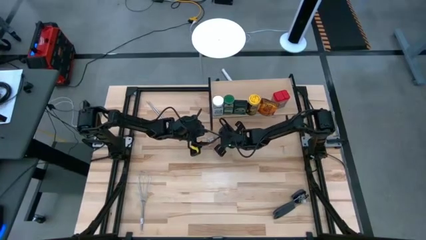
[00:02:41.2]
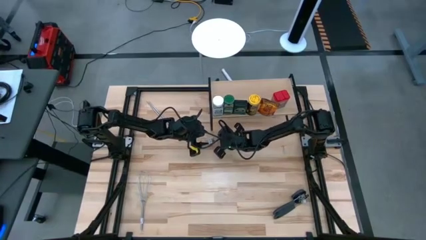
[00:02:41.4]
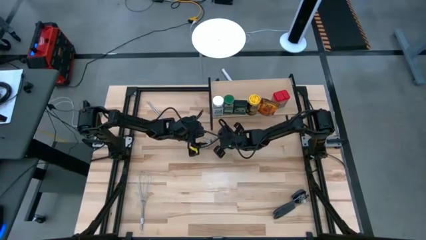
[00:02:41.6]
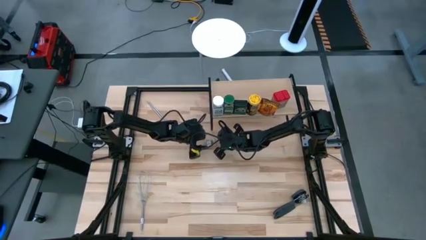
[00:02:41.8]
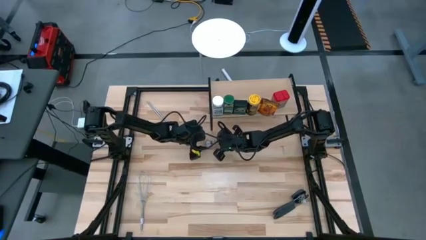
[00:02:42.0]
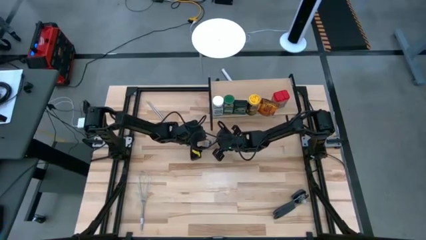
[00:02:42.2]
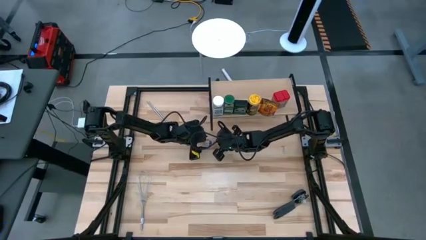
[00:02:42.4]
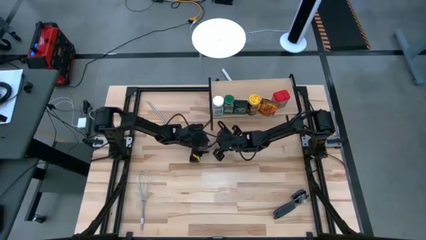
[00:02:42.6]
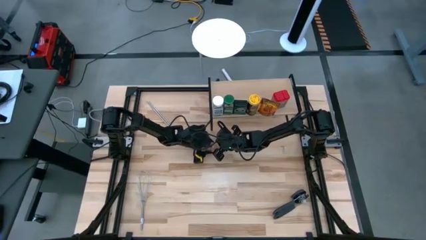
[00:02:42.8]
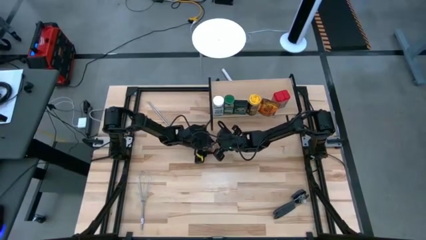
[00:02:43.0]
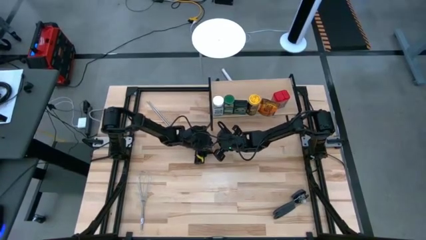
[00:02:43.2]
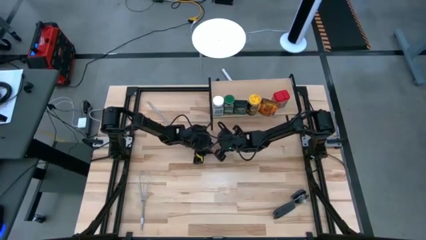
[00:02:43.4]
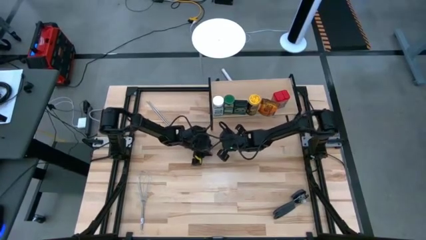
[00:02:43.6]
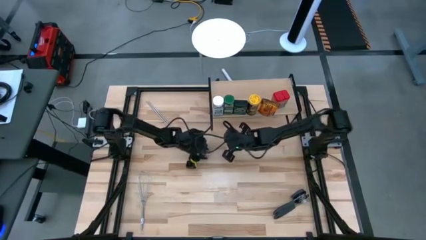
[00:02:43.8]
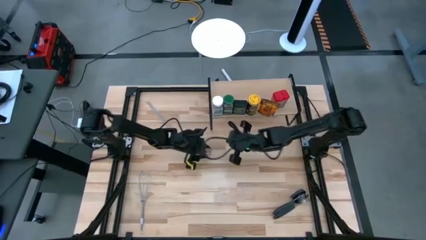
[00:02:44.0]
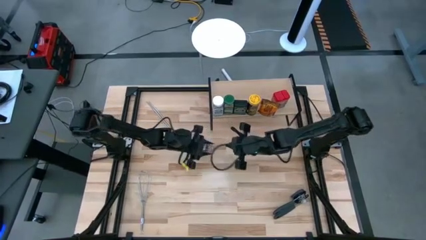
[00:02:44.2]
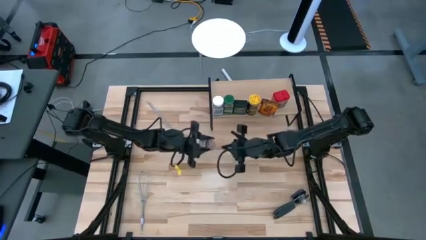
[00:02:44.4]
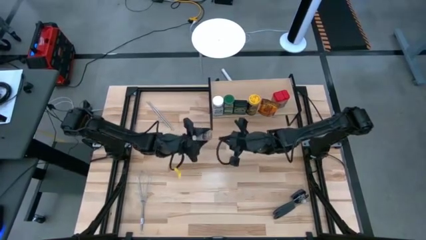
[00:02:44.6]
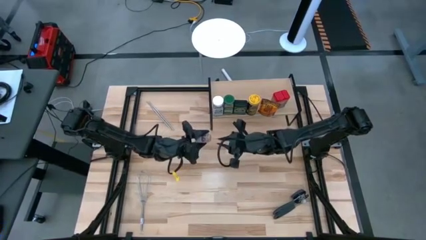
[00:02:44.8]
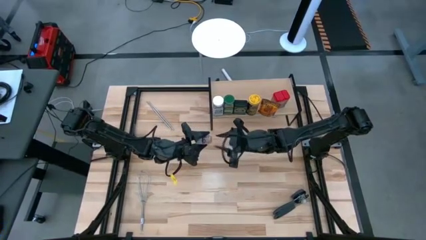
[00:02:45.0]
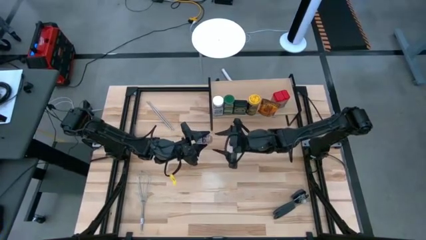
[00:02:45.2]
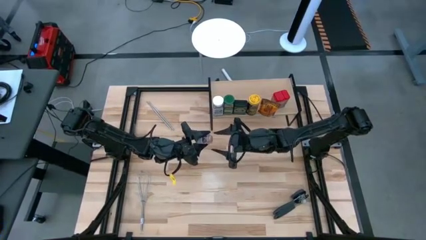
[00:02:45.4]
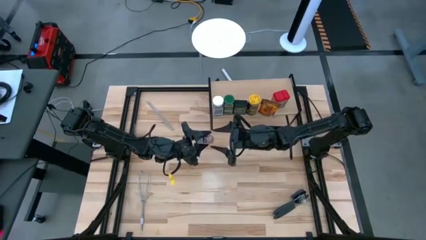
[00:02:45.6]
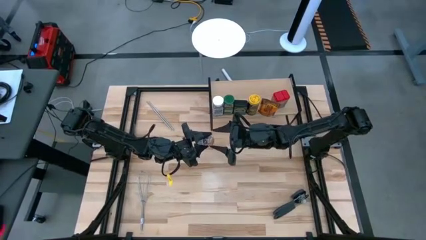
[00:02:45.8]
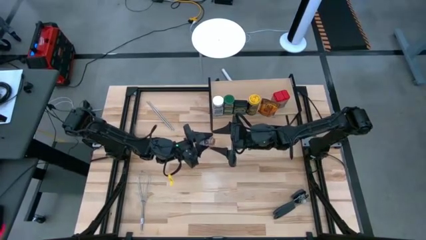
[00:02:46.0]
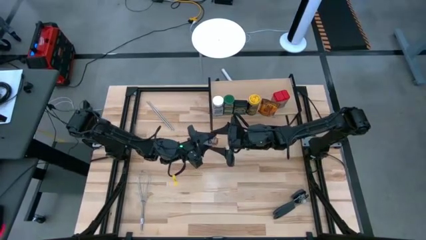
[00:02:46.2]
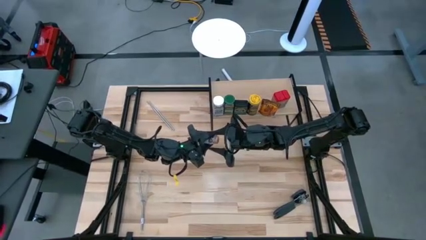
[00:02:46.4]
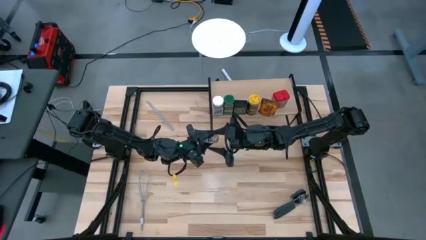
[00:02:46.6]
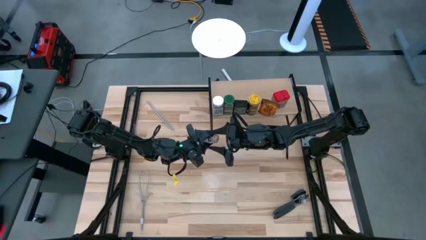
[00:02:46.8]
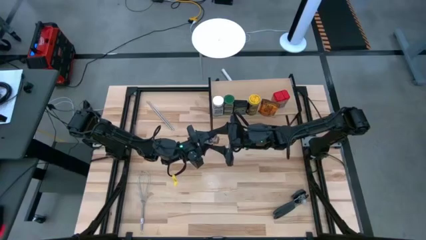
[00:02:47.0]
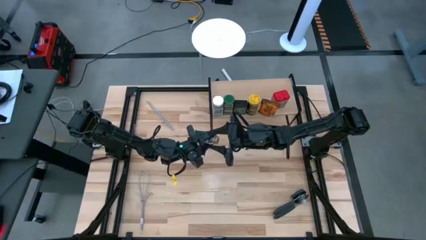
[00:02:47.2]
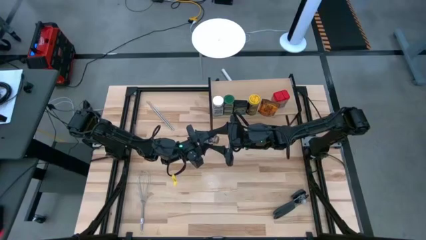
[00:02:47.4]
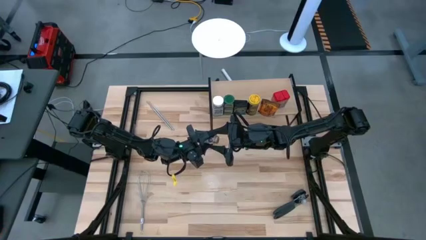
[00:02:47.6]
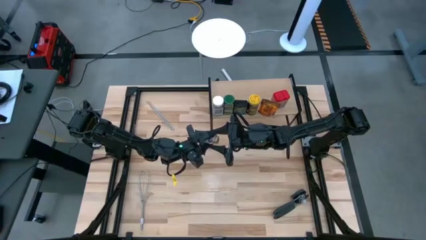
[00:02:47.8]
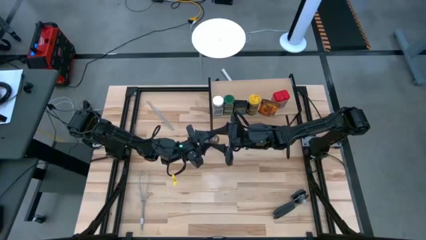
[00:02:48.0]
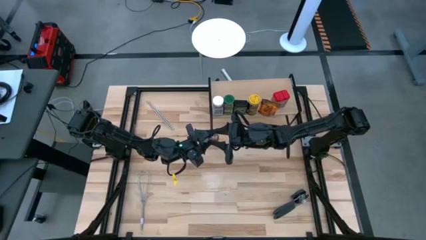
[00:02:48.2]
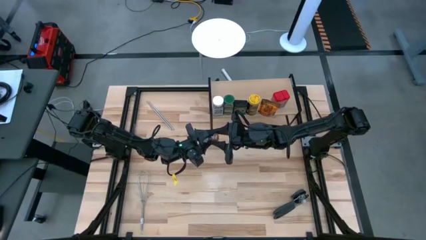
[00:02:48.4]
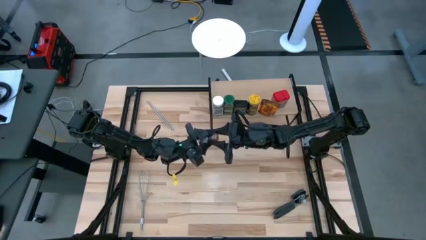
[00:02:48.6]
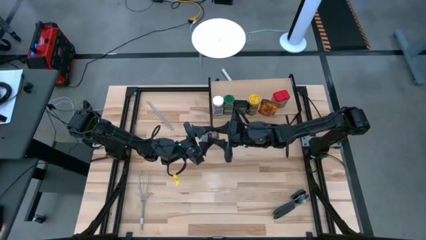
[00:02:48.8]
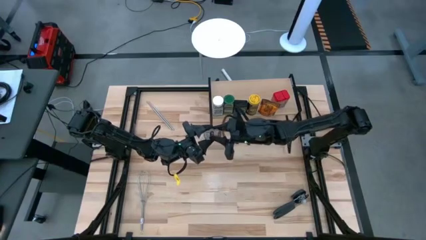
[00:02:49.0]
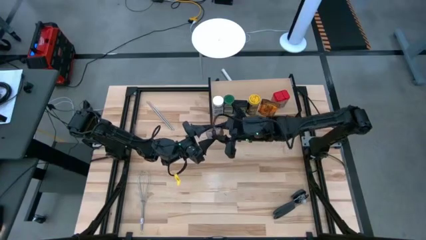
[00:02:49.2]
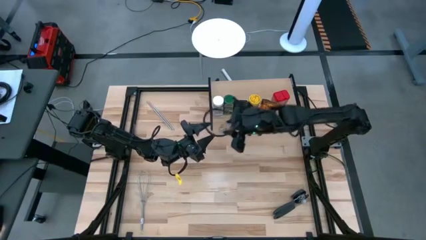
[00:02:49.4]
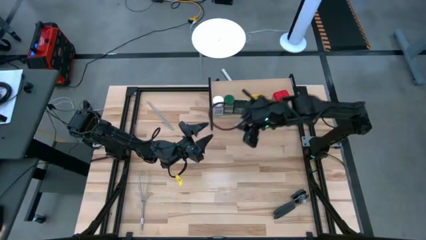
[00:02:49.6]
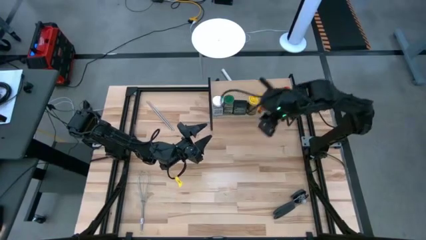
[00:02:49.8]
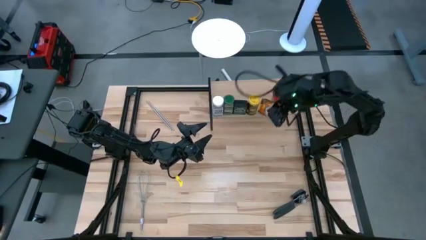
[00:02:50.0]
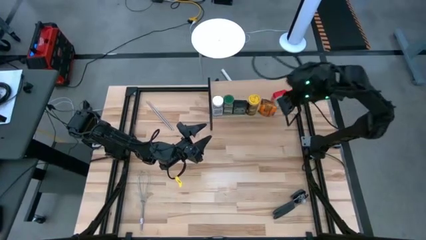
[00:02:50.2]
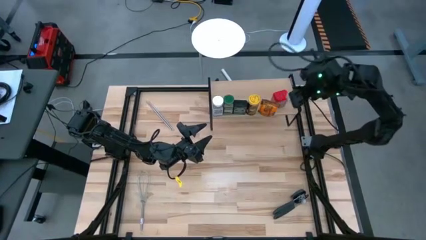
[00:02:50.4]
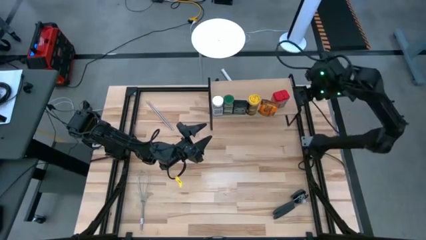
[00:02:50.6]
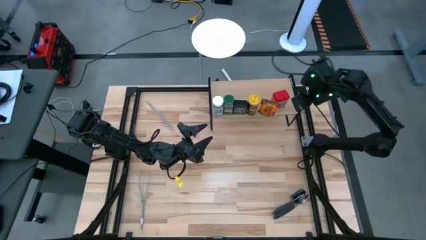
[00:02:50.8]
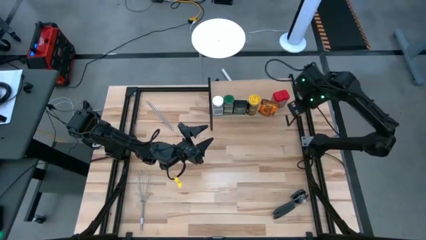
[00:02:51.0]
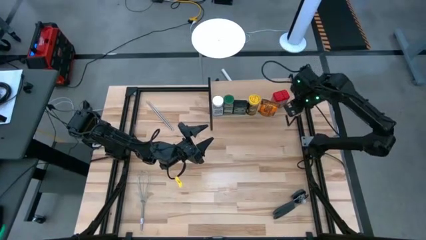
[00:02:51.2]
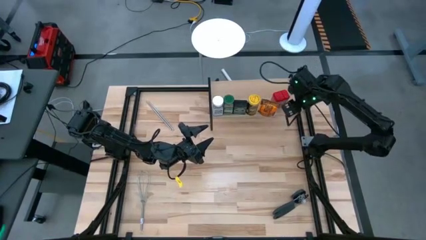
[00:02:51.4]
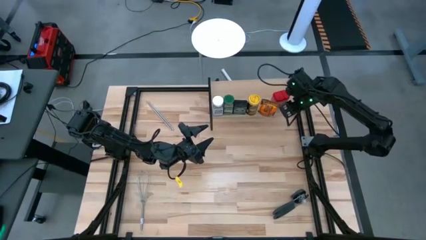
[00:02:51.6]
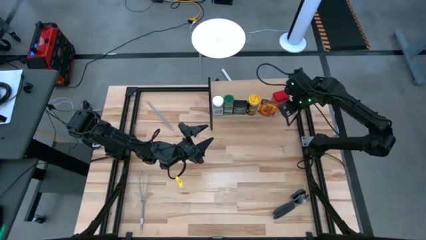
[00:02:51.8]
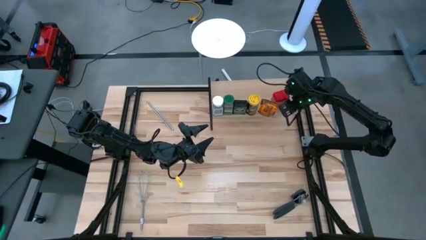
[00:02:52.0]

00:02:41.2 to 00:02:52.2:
Task: Shelf spices
Put the transparent seasoning bottle on the shelf

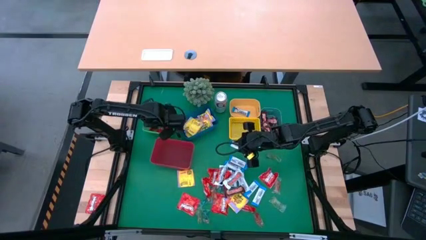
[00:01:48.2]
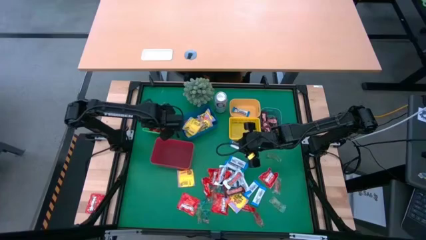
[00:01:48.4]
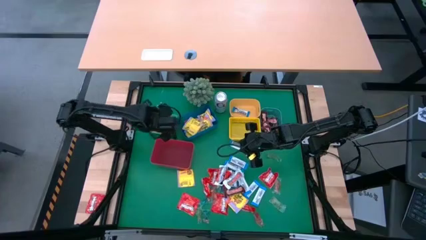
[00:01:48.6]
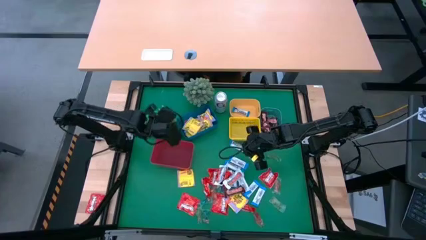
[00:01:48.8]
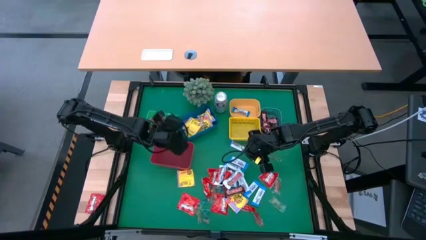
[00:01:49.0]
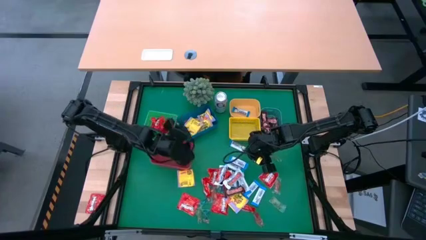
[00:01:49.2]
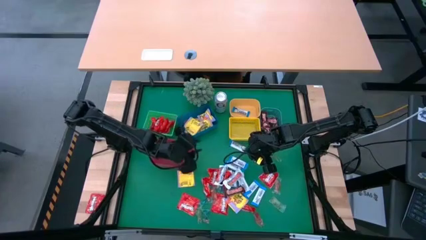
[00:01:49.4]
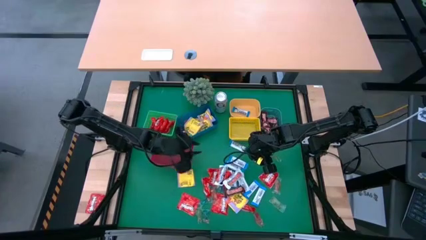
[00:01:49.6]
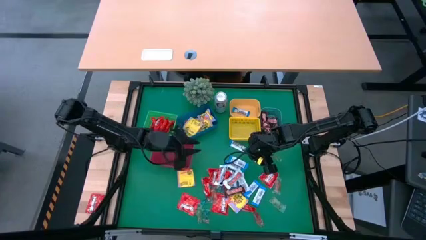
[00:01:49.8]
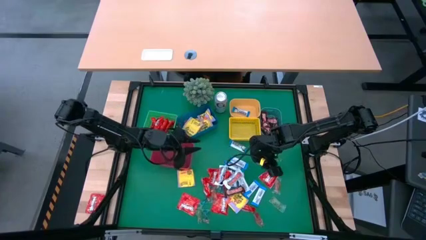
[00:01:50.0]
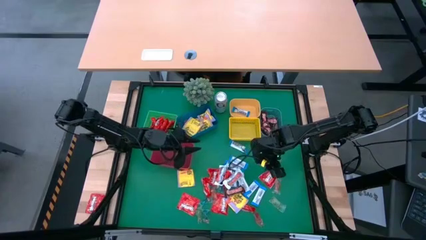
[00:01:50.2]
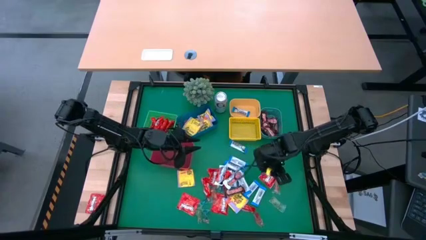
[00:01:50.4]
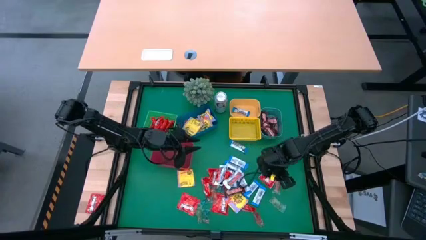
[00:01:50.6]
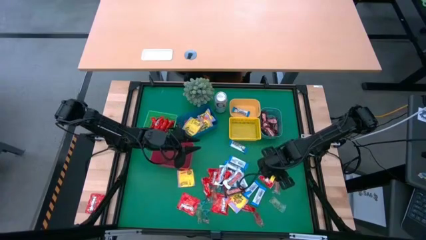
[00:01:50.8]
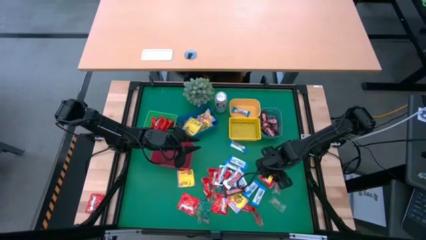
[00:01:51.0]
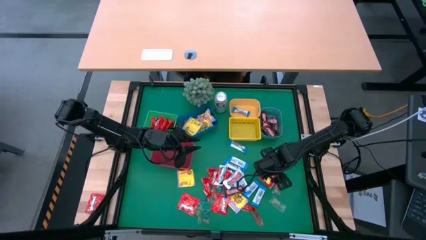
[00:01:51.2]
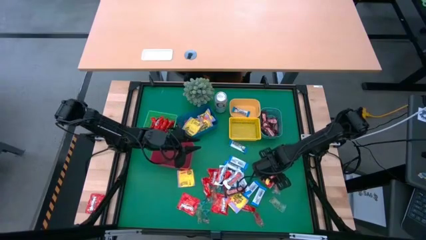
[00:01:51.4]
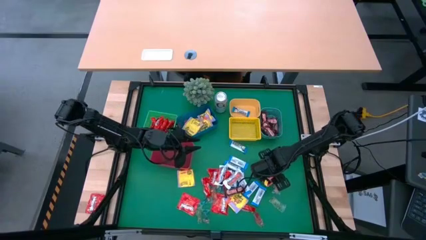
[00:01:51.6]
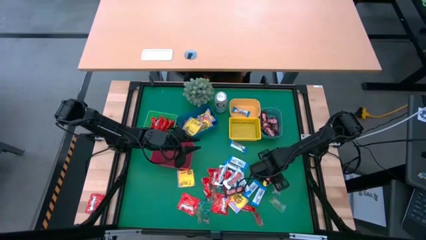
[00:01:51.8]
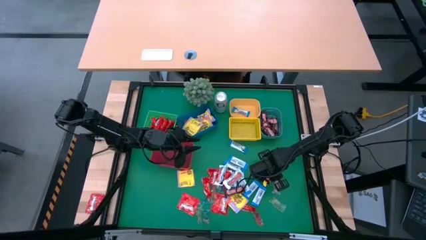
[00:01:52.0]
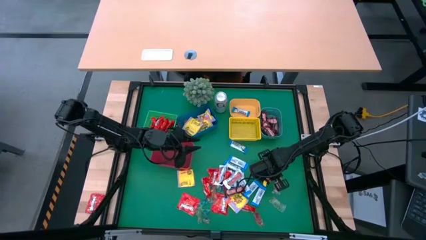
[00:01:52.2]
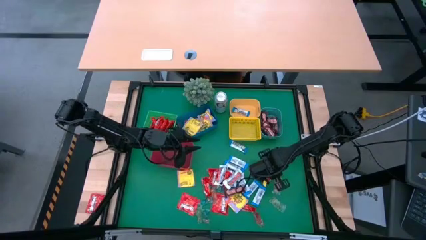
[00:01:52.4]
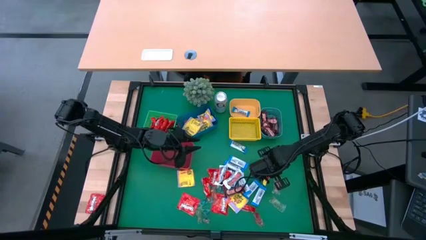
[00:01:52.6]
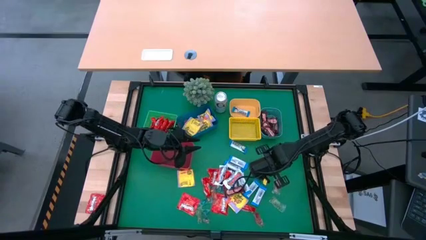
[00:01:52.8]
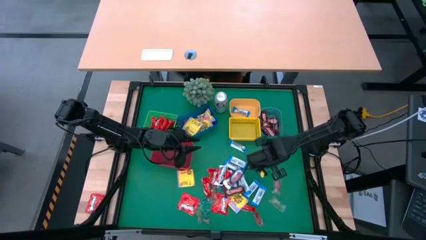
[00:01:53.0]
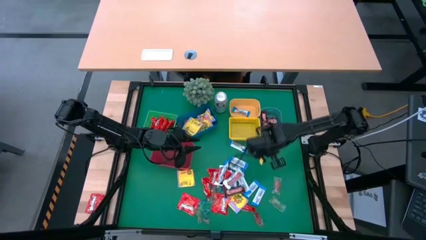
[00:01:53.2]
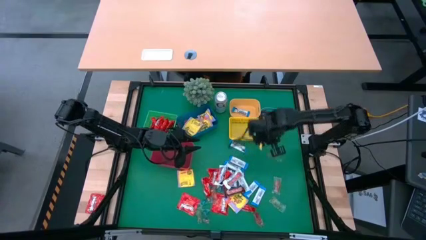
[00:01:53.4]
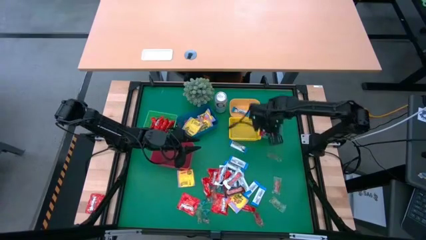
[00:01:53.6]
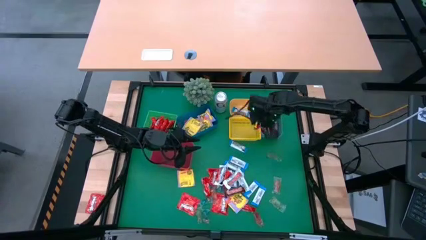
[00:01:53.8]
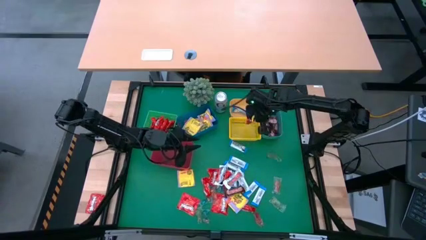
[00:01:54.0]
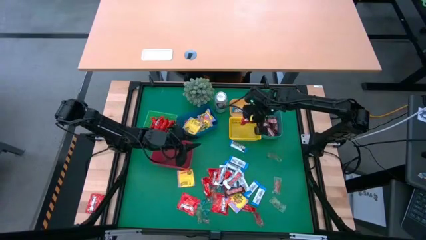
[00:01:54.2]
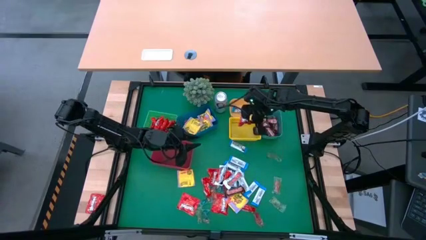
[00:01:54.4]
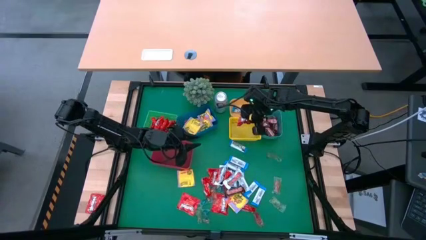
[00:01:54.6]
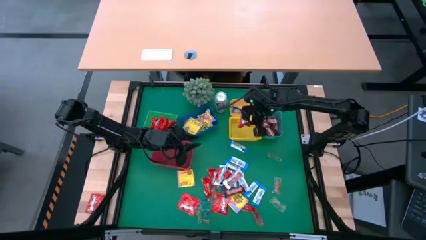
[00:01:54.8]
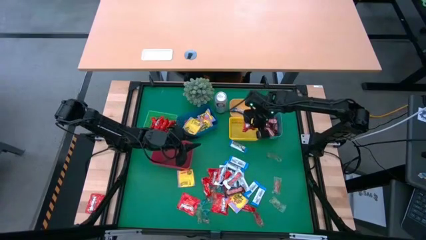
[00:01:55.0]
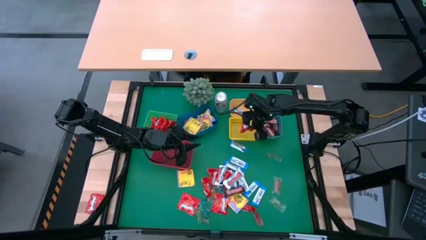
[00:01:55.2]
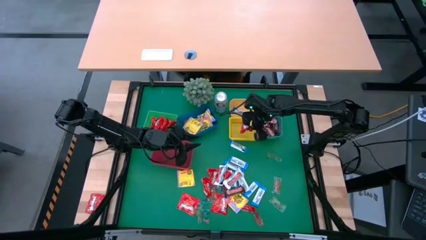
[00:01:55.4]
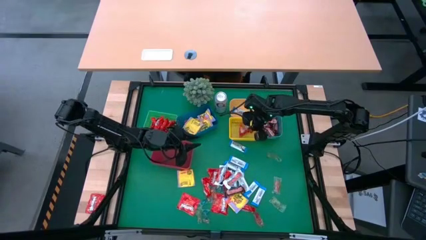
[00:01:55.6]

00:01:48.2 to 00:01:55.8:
Task: Sort candy
Put the red chocolate bar into the green bin
